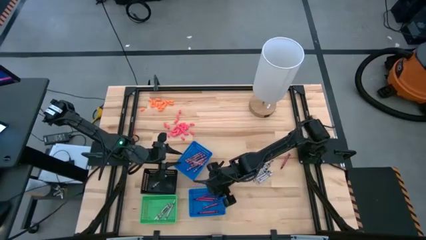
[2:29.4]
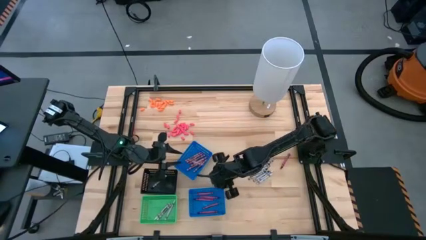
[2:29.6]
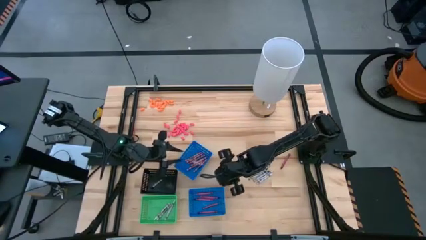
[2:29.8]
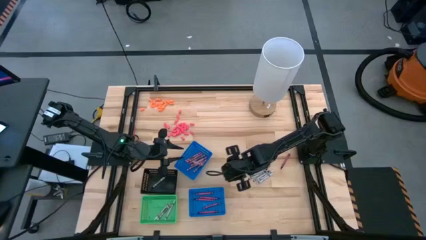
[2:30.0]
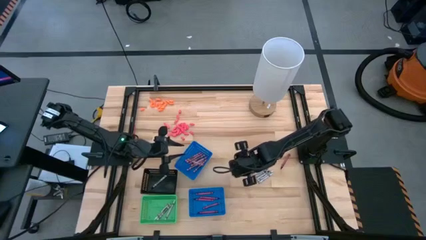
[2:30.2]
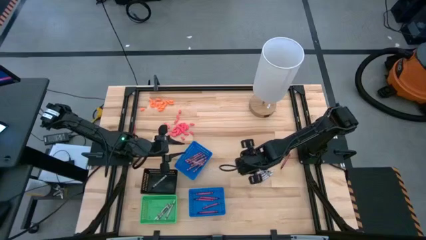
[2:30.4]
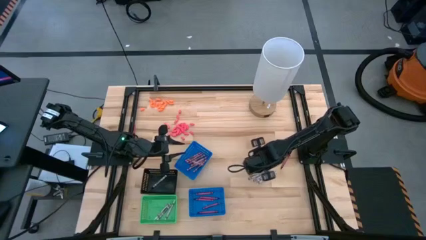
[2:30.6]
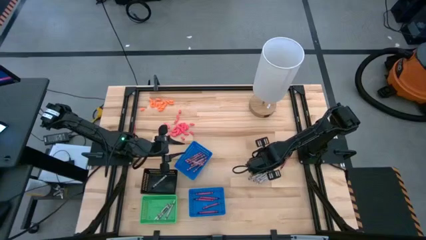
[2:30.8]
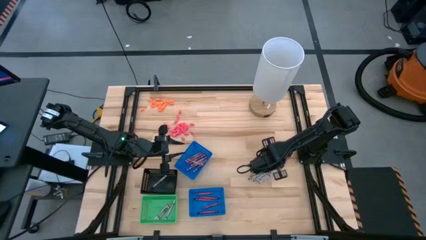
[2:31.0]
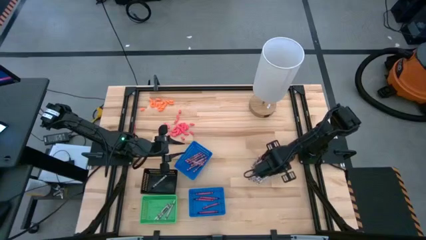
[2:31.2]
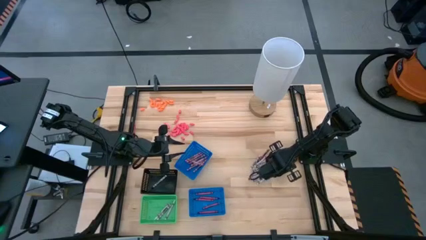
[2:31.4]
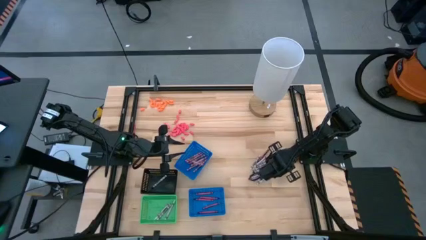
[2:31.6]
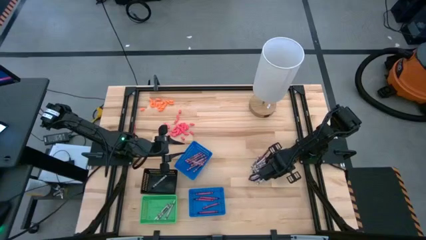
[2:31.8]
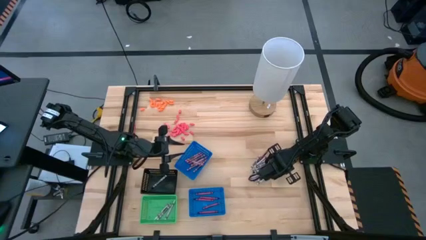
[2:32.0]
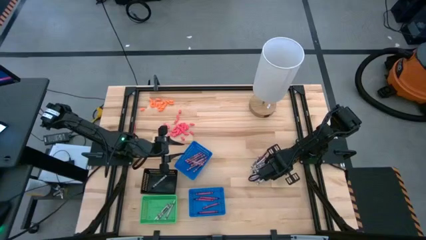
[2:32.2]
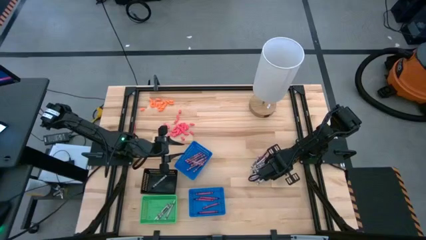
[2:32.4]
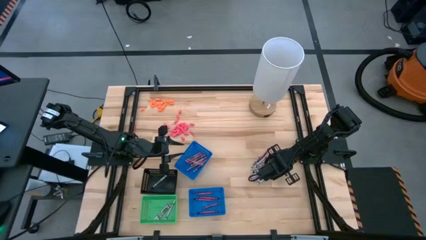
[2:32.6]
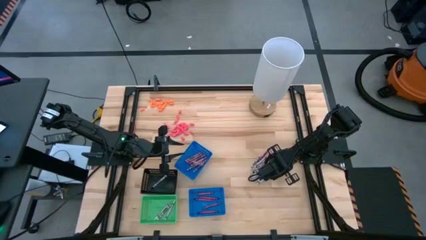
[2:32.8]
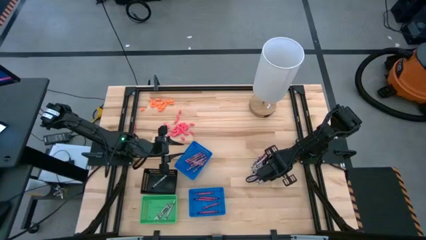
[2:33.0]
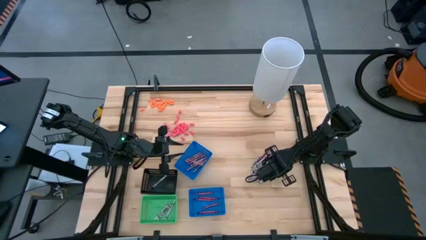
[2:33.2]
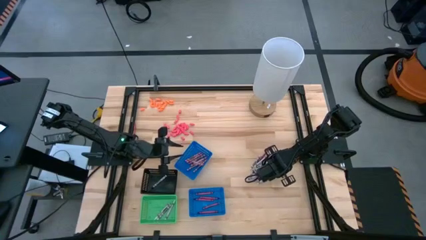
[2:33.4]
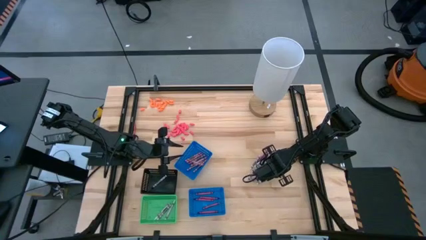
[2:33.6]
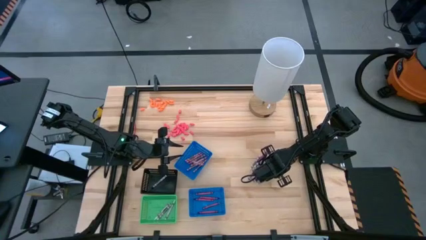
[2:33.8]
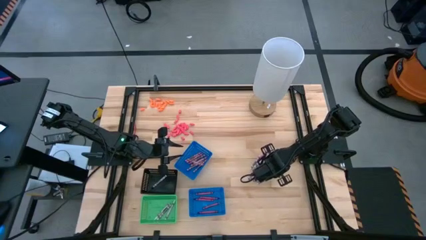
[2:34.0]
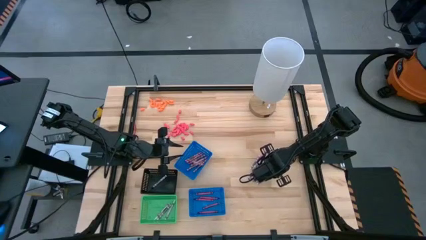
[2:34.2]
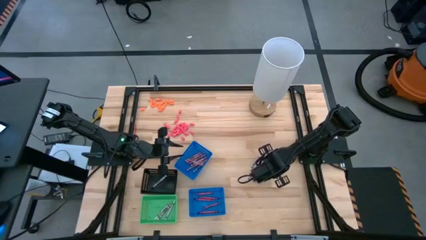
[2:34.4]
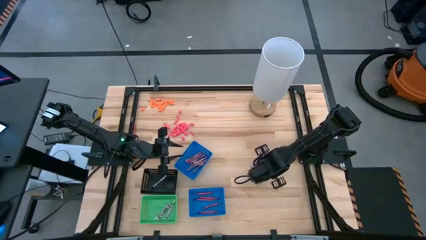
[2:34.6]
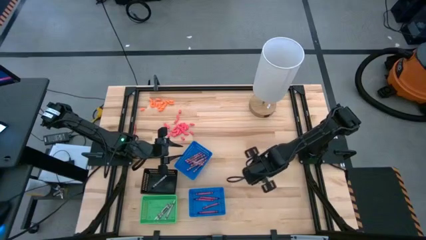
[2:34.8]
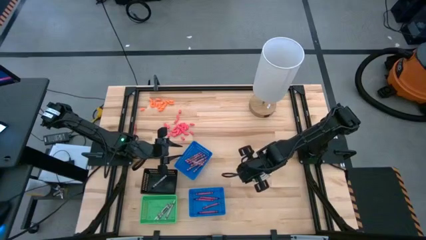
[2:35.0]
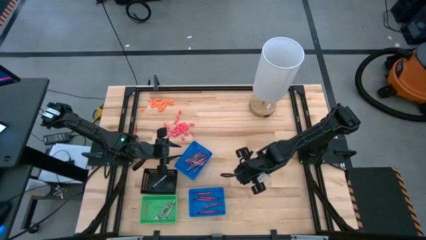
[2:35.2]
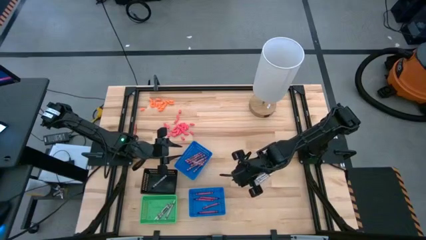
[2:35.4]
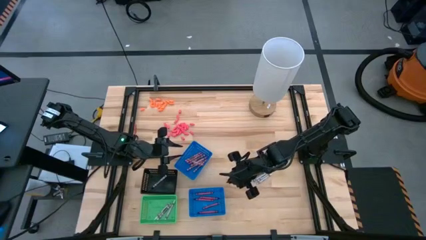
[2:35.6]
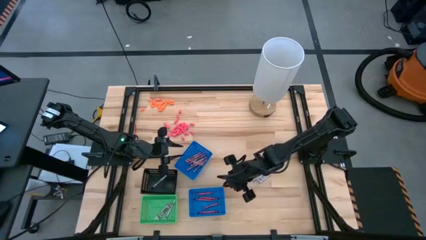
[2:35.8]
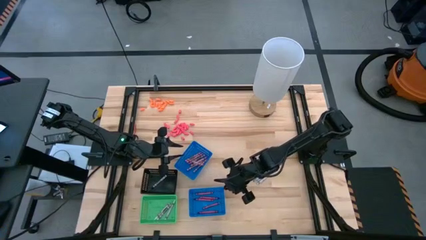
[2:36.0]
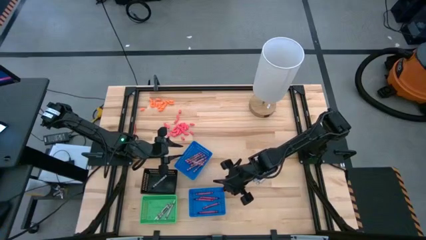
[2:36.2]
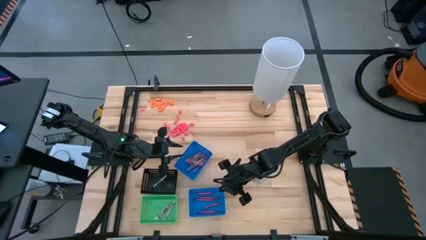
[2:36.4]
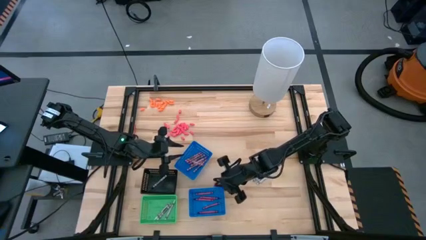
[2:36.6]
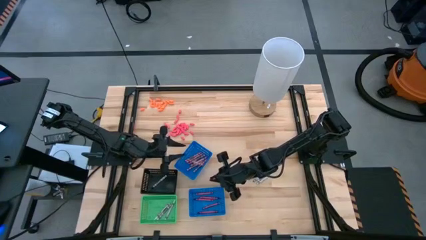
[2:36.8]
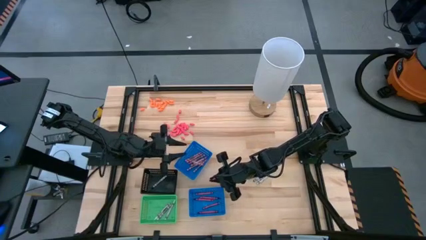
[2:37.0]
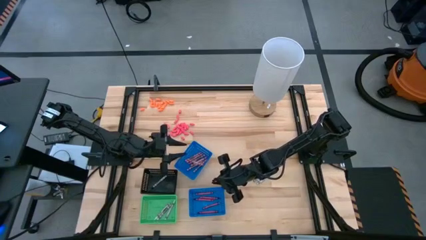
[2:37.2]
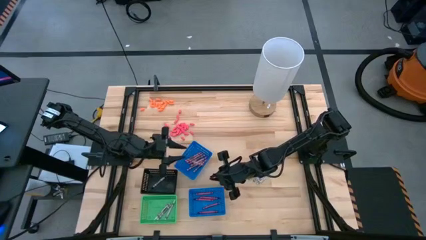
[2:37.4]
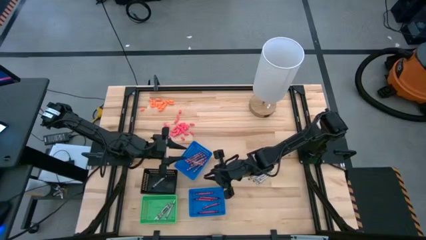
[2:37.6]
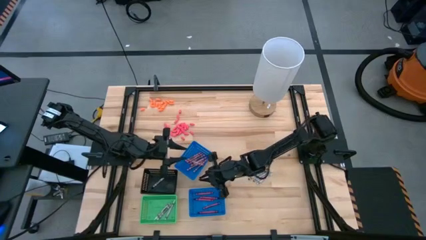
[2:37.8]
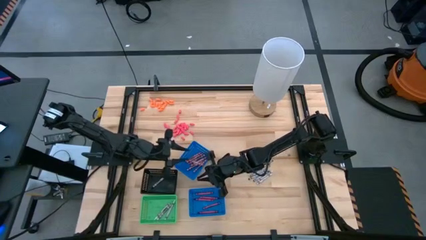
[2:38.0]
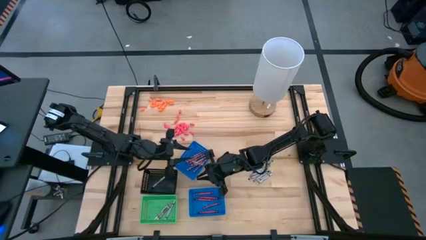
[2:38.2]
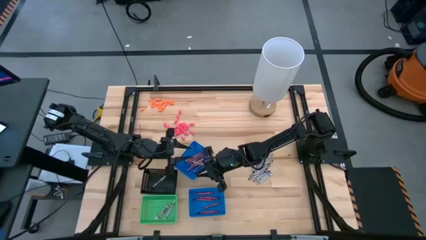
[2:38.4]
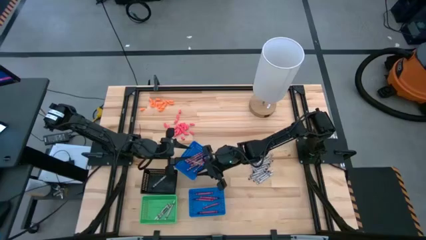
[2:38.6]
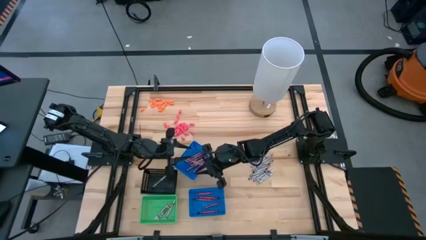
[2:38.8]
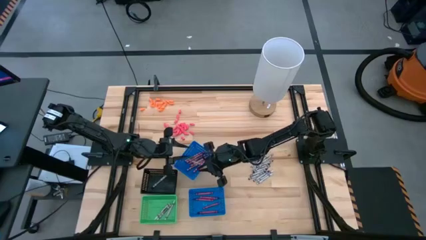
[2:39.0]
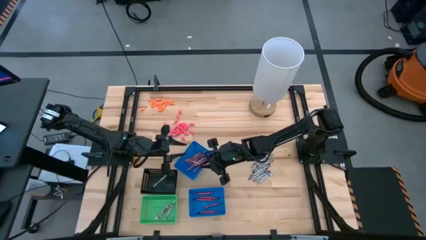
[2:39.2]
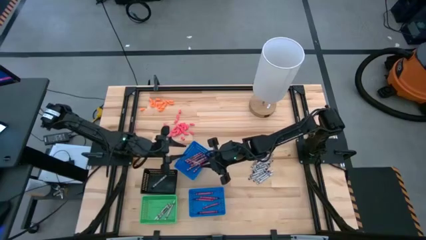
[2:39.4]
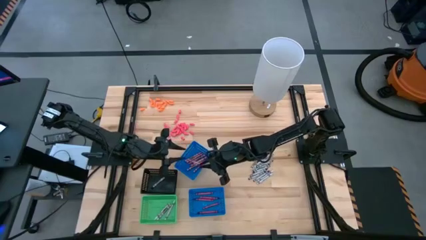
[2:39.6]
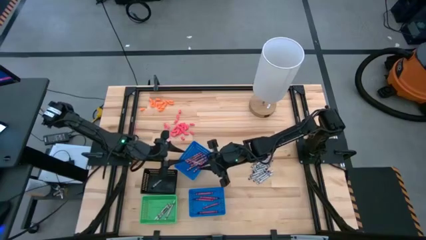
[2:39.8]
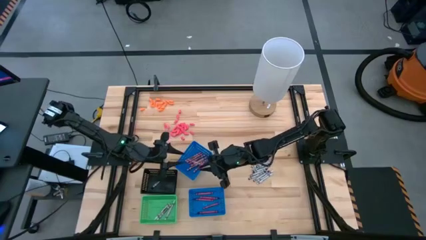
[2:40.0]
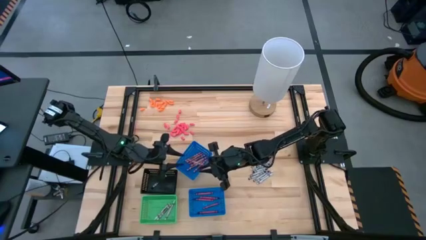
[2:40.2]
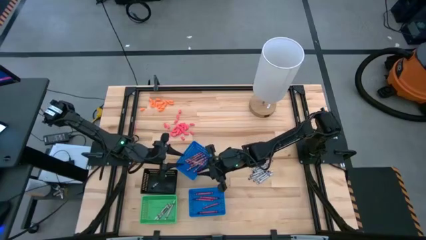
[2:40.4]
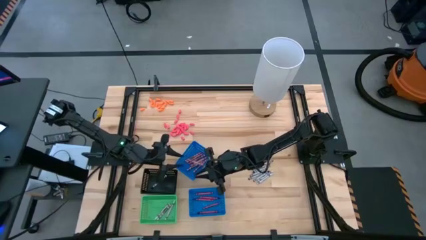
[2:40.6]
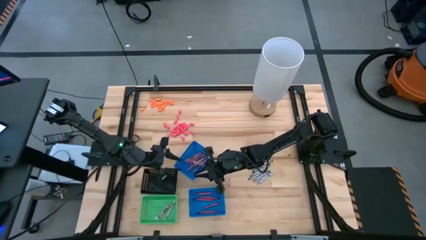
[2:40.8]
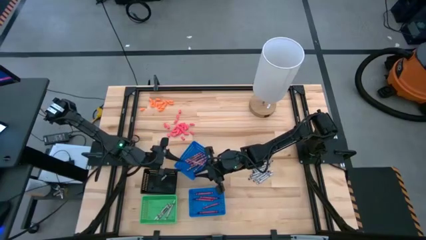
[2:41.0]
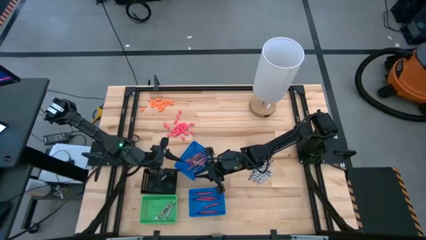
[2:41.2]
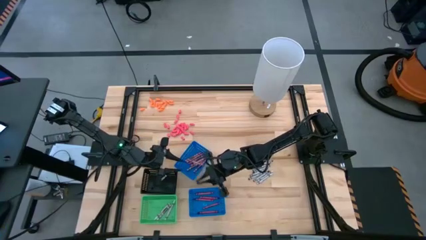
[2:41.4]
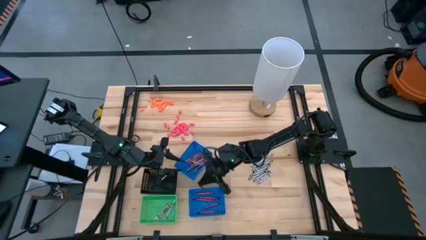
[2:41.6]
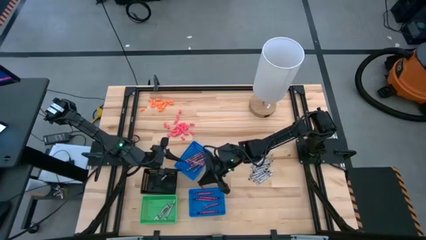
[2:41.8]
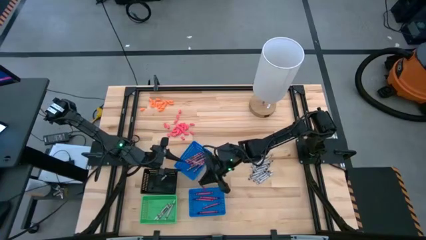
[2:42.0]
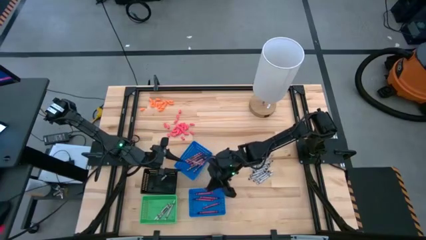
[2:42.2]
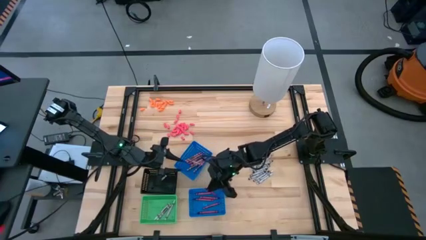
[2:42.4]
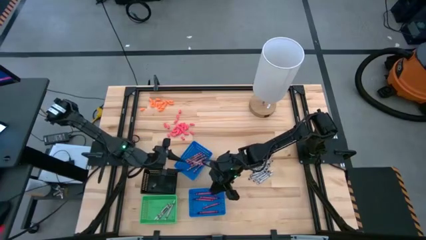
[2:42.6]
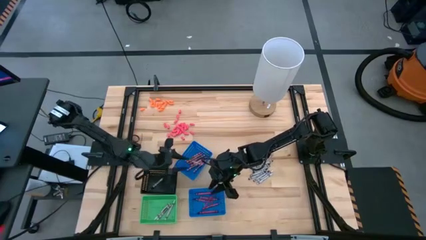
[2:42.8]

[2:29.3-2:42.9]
Task: Sort crayons
Put the violet crayon into the bottom blue bin

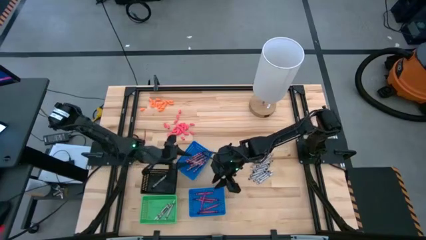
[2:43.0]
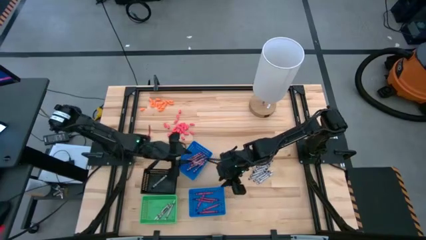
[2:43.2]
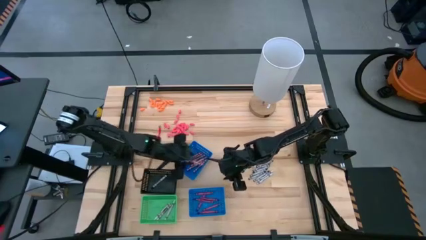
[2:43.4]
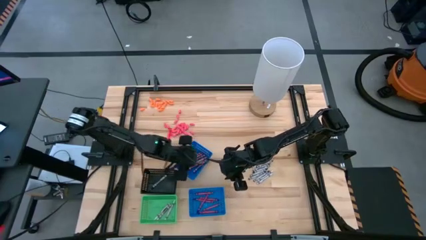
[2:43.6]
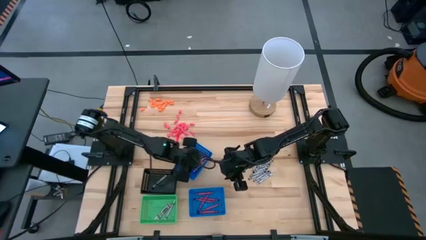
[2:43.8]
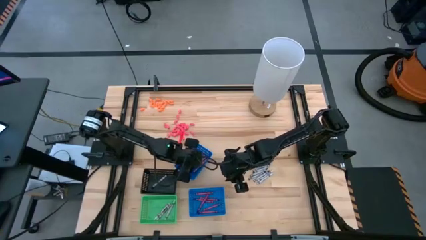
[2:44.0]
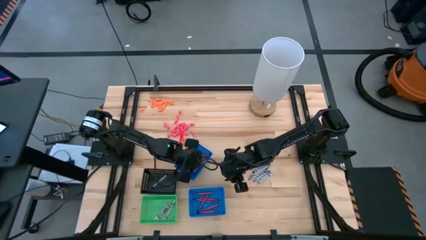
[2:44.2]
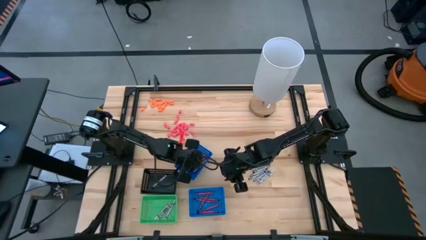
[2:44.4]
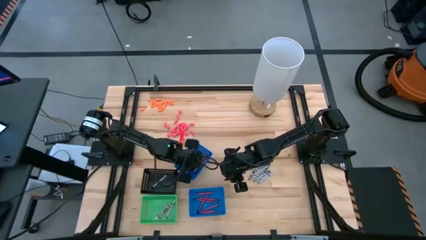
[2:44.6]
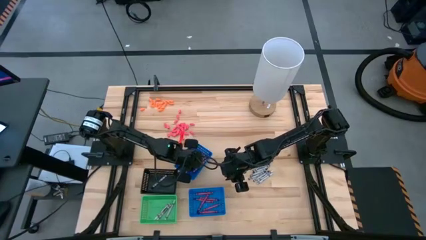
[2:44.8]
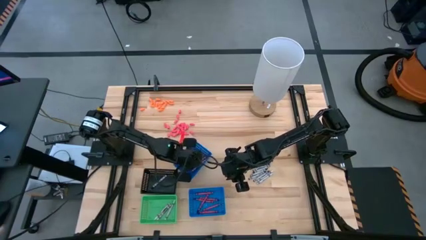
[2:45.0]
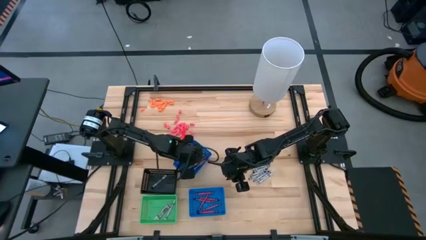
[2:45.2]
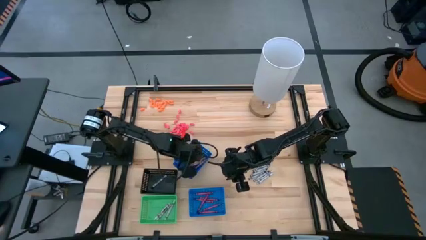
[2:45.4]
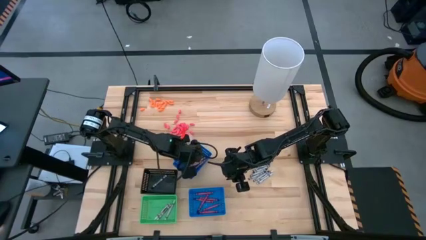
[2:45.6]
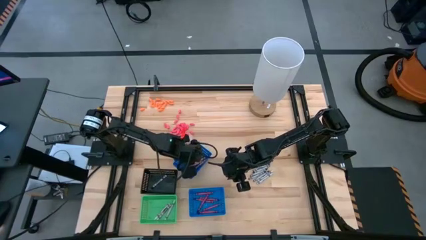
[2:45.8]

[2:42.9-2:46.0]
Adjust the pink crayon into the top blue bin
